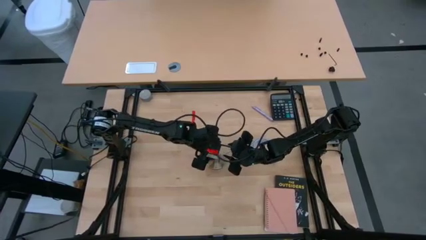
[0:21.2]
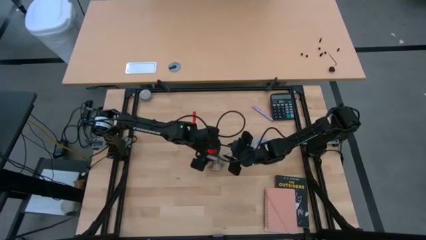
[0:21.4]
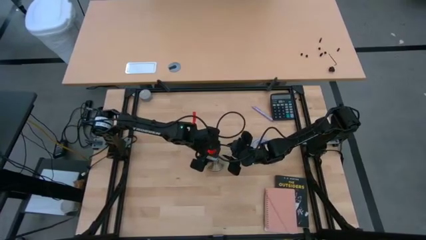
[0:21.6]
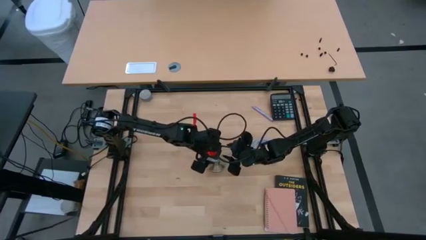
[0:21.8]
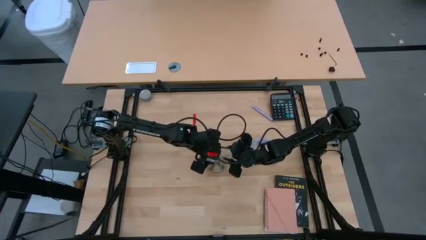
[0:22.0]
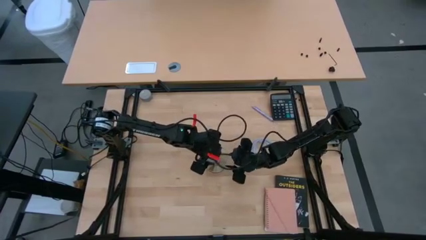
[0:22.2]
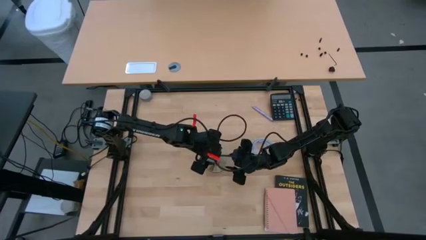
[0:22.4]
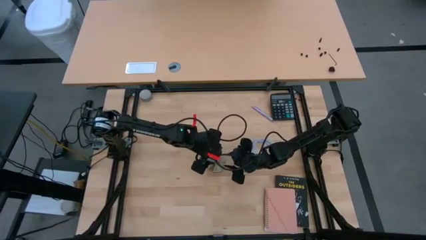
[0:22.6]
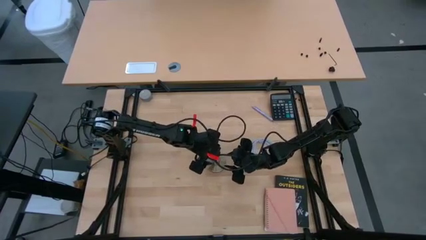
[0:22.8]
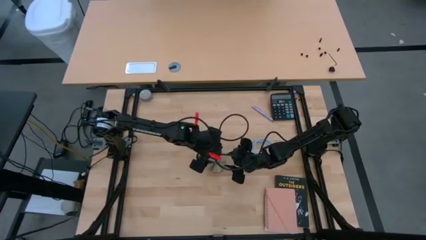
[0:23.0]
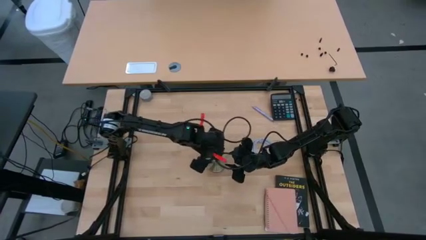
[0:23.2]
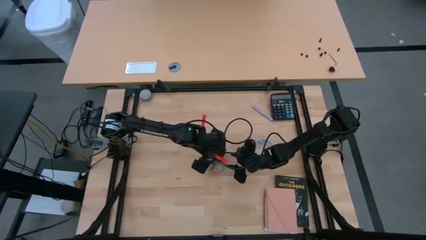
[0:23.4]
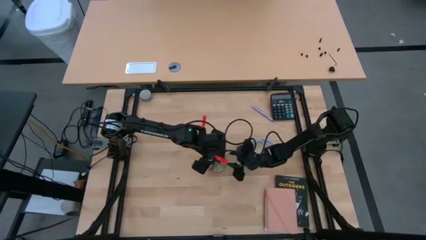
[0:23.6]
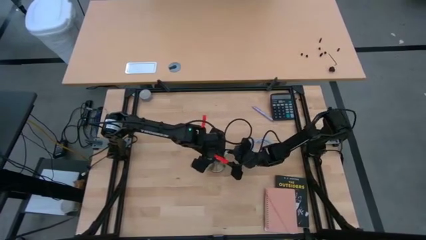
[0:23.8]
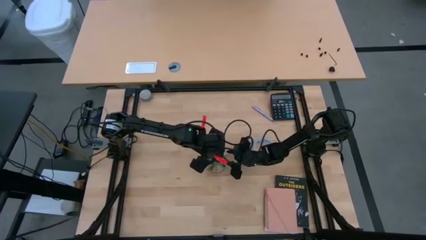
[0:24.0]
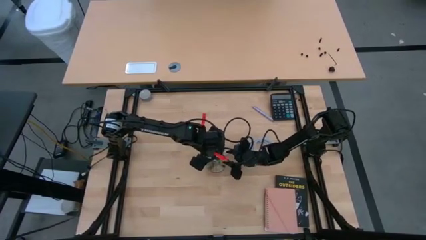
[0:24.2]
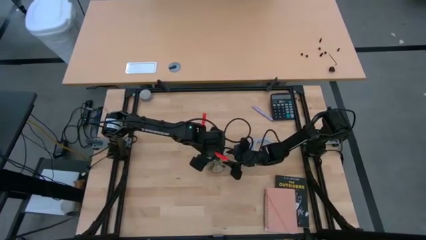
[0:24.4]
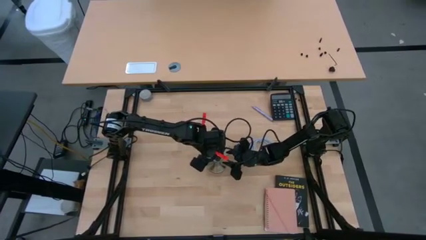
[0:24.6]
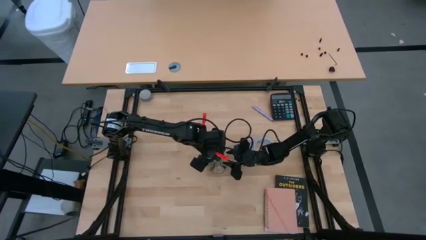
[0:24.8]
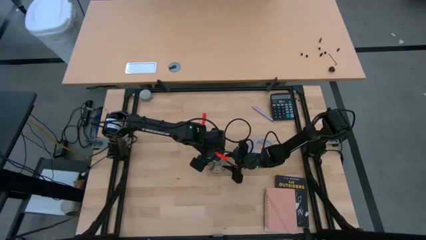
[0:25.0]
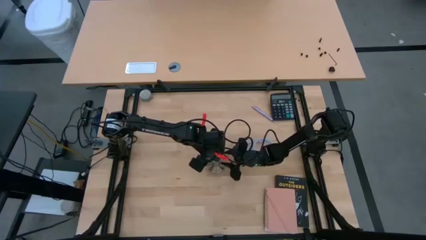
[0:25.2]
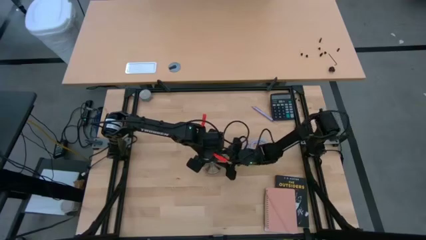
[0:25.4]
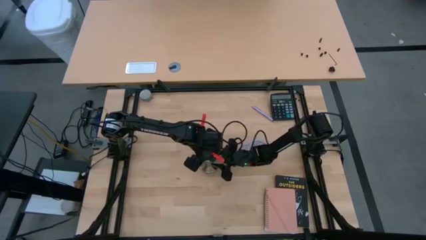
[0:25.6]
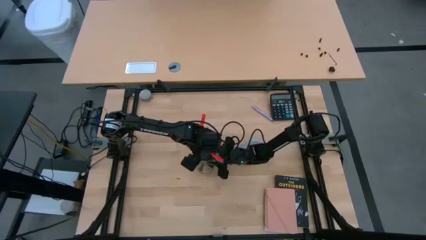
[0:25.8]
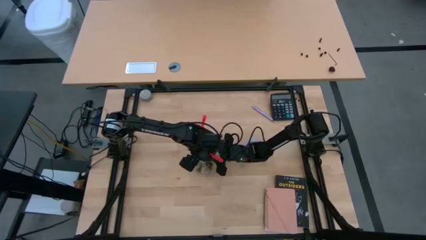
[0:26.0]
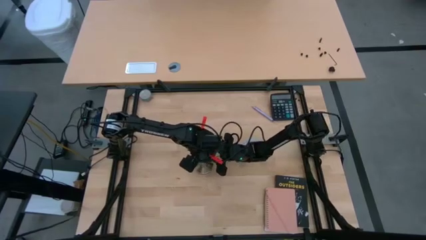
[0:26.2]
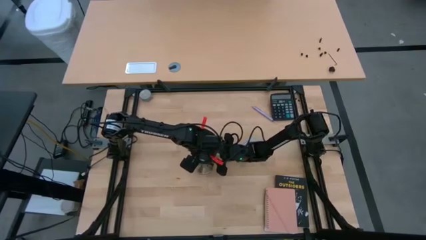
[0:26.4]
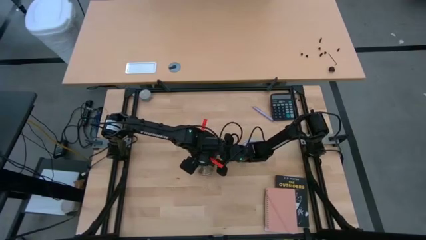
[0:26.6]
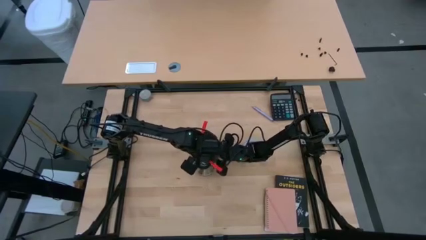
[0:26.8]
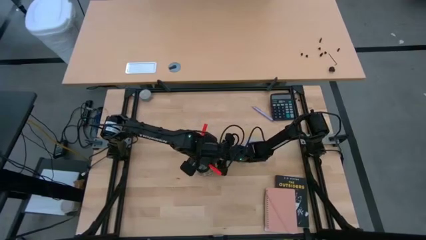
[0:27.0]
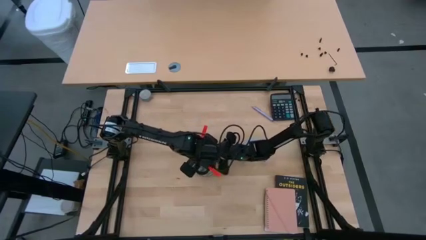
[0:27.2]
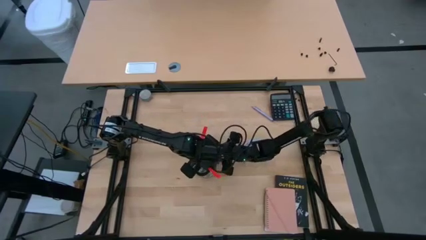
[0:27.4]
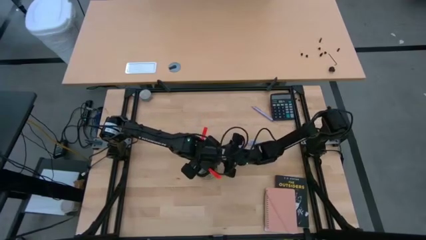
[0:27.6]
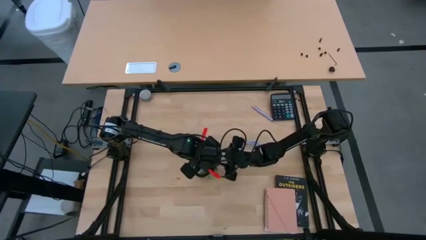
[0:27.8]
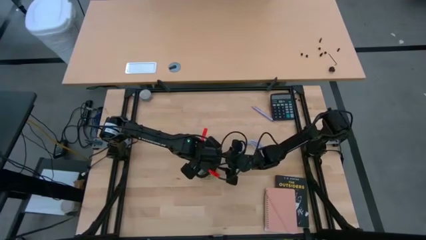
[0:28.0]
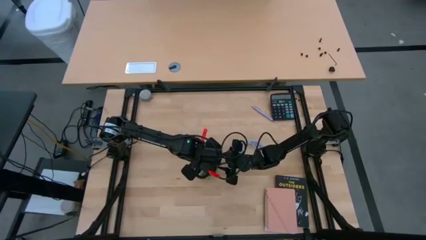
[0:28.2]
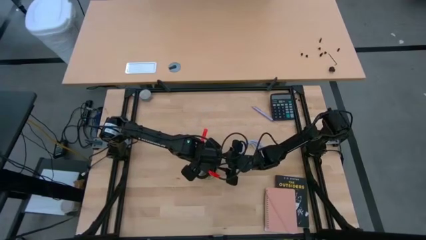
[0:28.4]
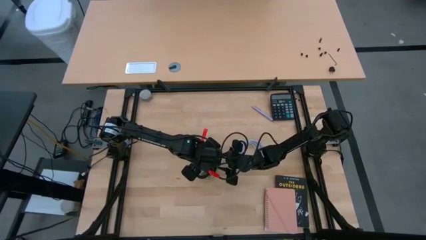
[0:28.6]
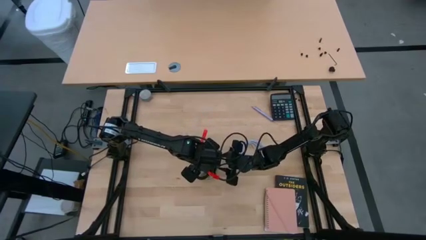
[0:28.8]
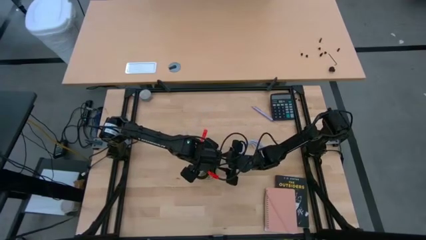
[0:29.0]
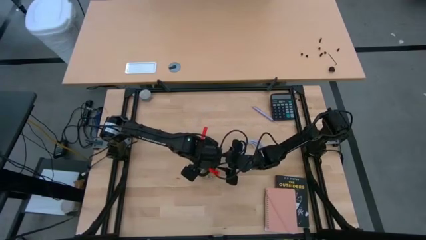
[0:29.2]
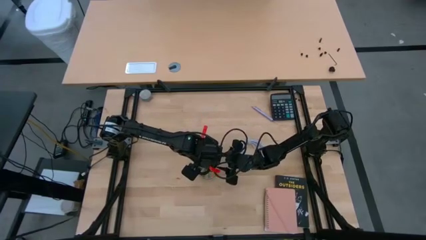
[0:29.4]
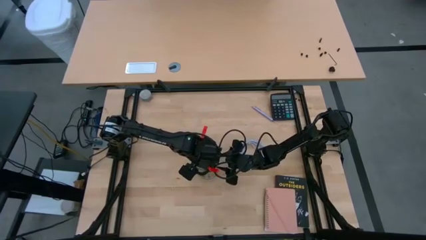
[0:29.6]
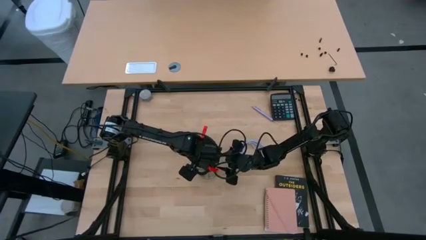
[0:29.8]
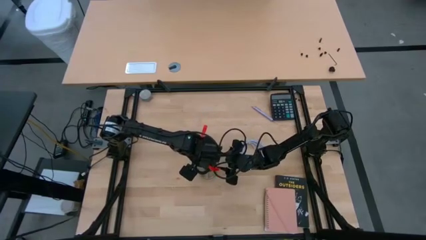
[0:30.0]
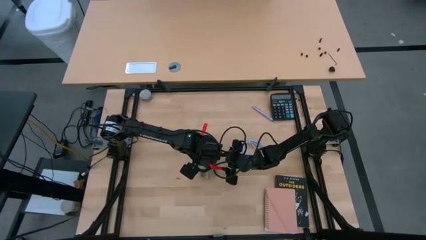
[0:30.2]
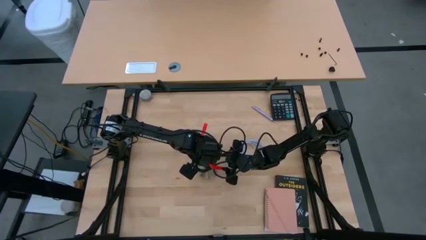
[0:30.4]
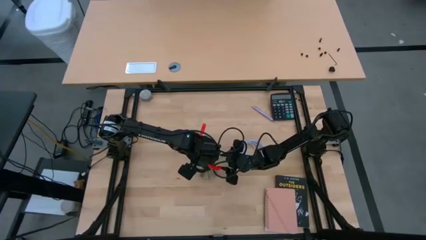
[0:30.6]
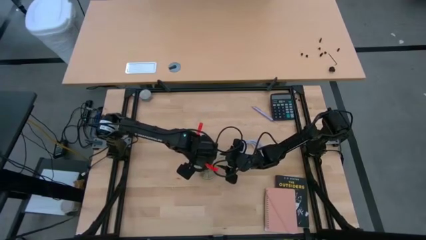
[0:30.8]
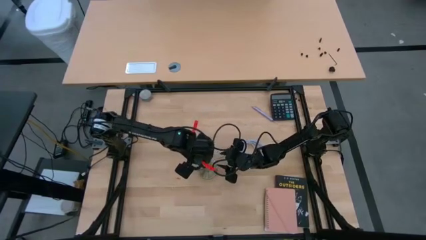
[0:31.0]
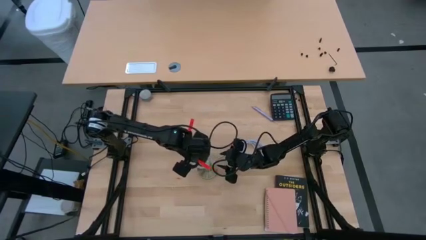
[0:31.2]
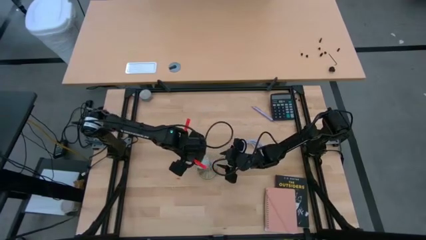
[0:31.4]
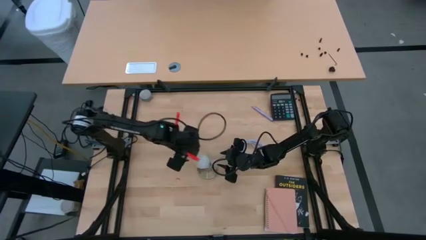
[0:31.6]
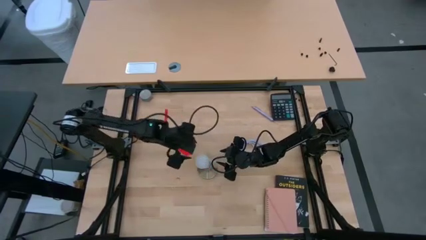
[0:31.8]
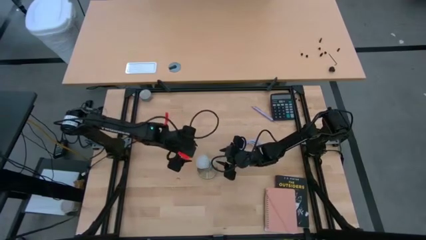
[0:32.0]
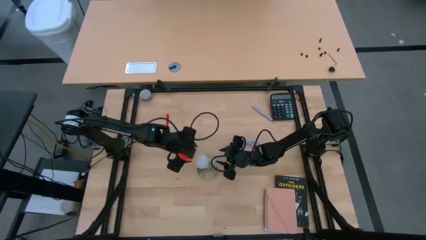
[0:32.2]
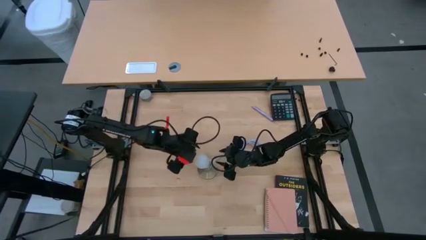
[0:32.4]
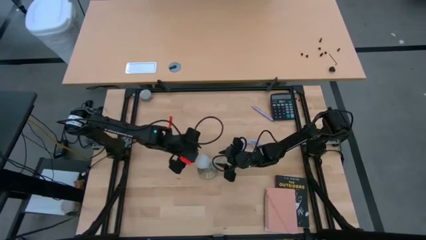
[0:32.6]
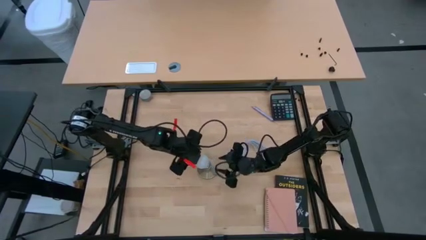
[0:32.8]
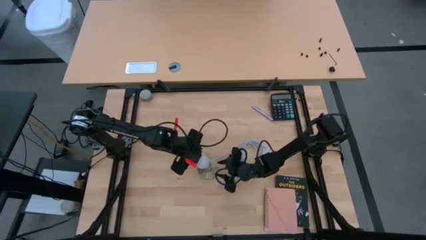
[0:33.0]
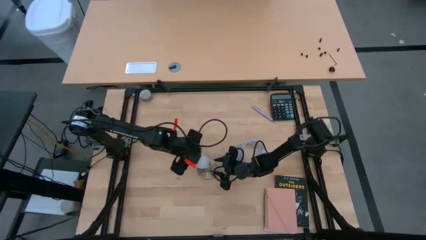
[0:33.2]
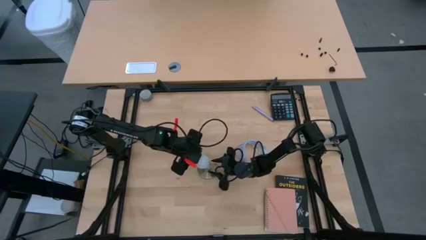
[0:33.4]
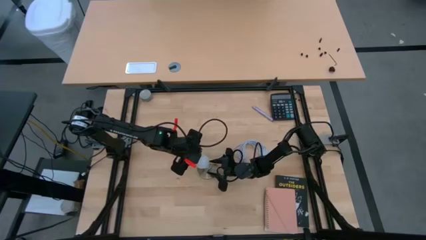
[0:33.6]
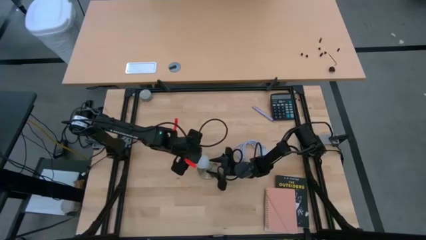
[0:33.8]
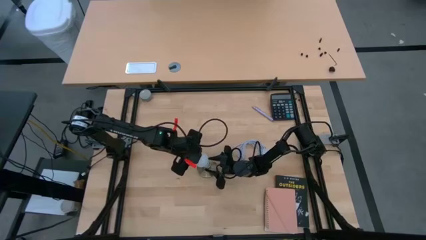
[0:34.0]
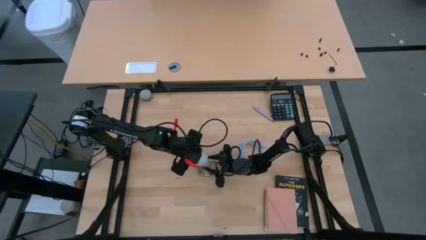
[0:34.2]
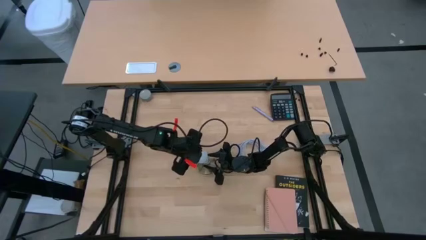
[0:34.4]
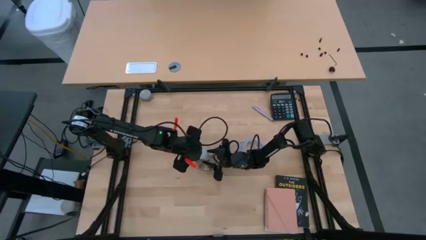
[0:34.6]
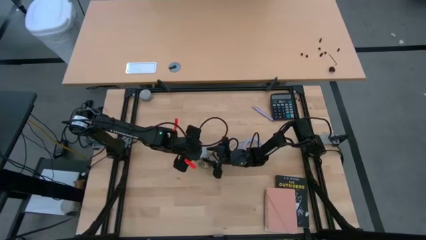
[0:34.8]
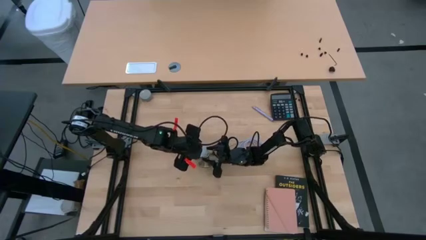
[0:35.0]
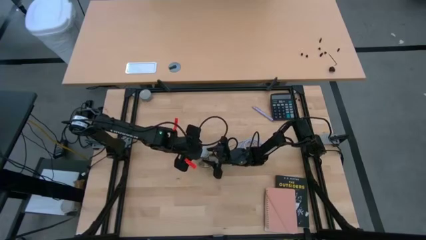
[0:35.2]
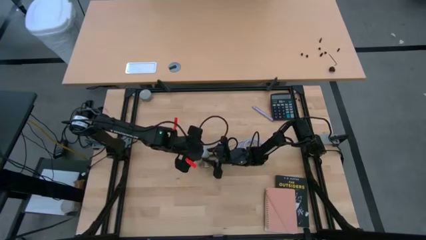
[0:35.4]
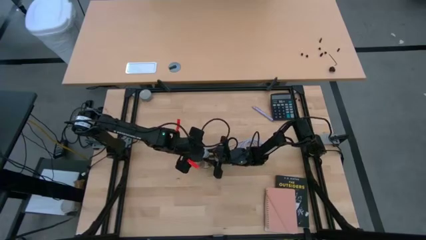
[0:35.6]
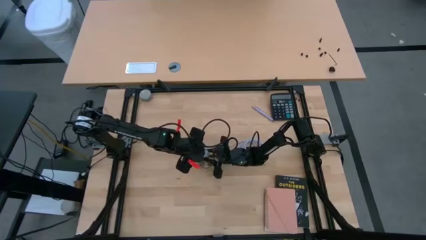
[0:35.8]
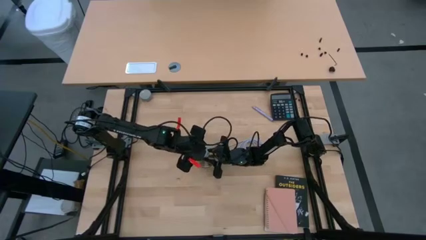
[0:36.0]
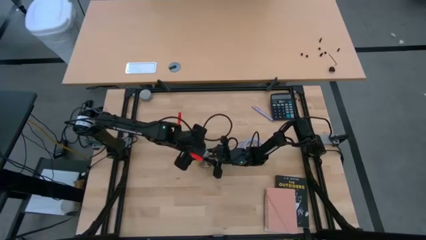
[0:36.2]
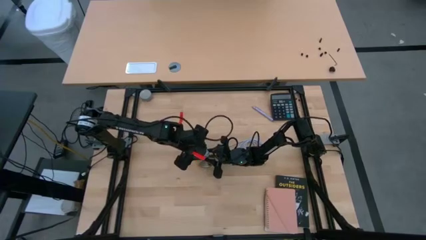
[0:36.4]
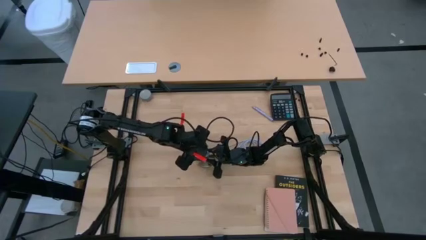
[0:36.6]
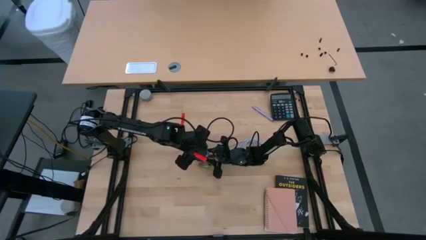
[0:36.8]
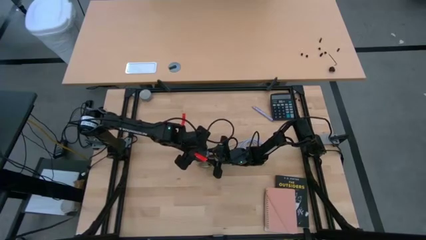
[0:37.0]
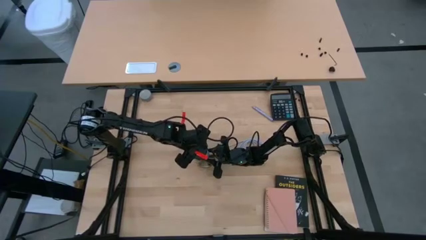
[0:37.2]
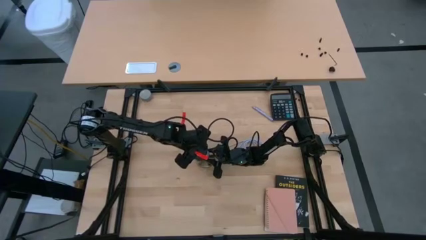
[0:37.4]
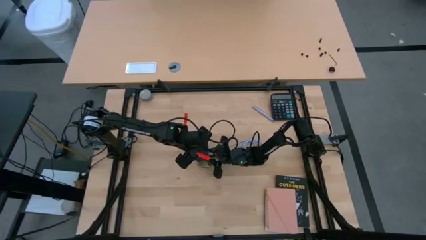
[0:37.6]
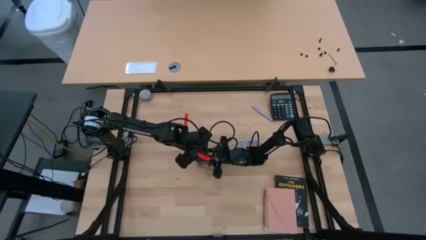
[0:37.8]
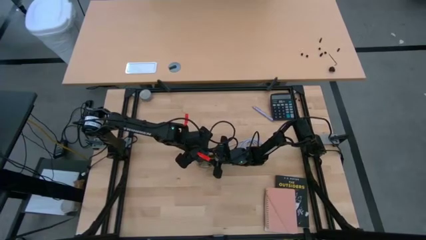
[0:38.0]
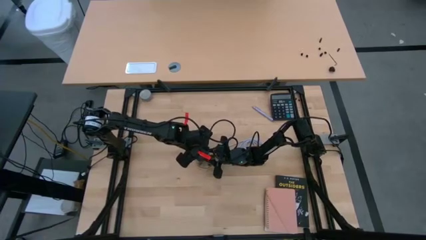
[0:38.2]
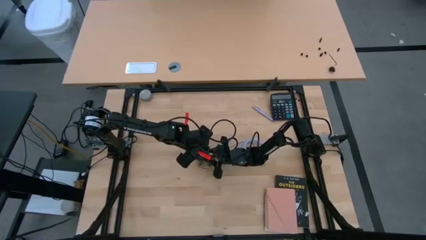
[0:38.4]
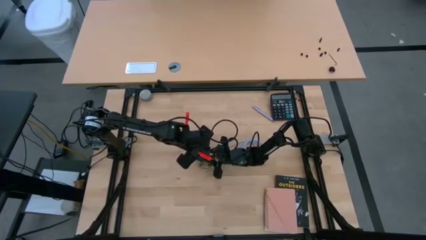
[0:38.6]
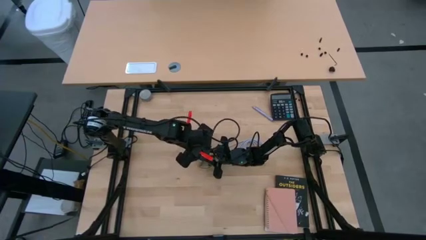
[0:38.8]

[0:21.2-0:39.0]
Task: Screw lightbulb
Insert the light bulb into the lamp
